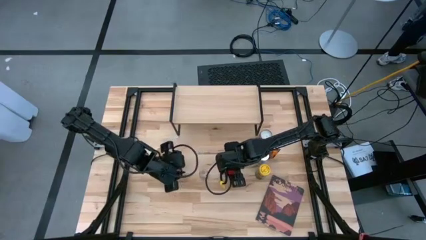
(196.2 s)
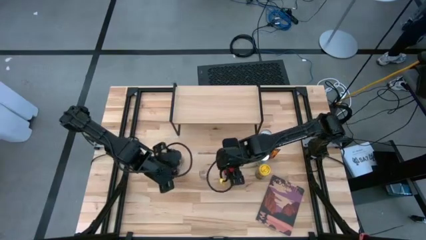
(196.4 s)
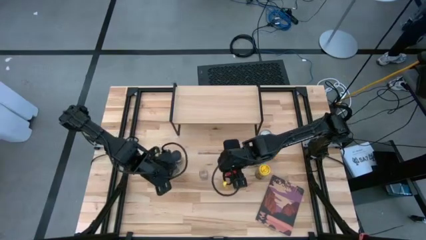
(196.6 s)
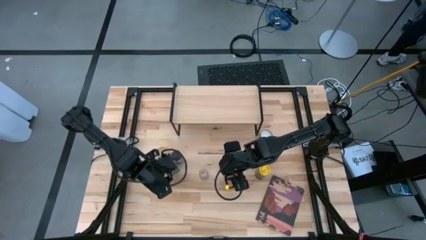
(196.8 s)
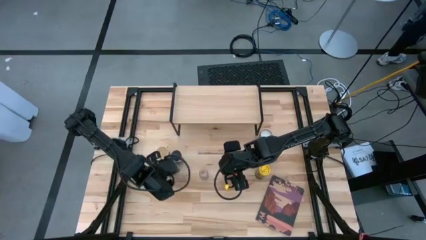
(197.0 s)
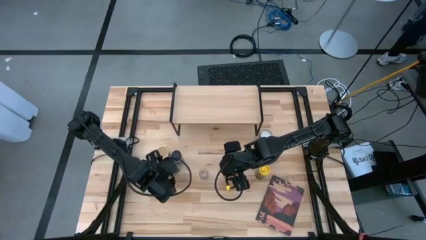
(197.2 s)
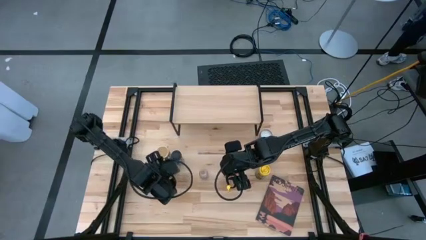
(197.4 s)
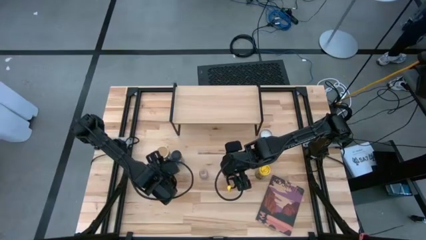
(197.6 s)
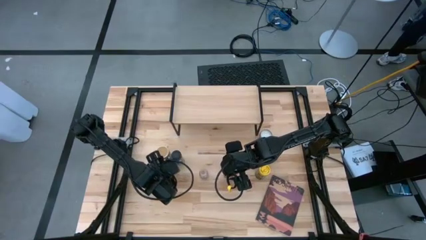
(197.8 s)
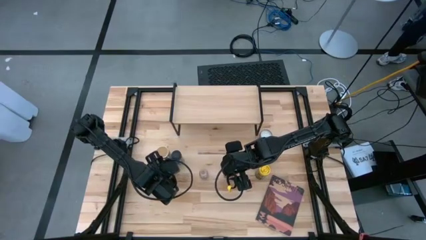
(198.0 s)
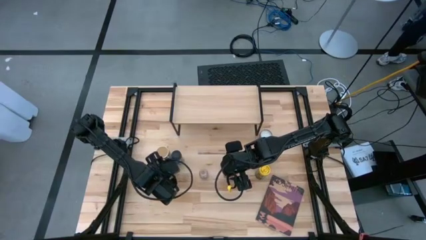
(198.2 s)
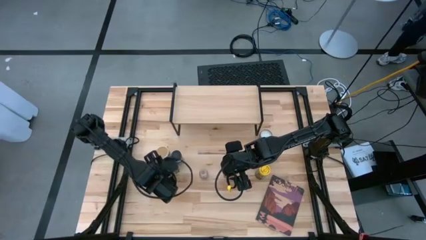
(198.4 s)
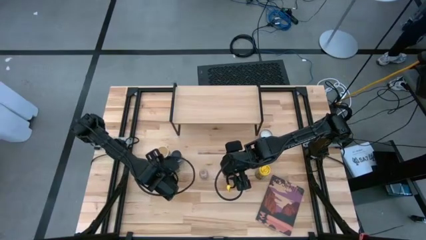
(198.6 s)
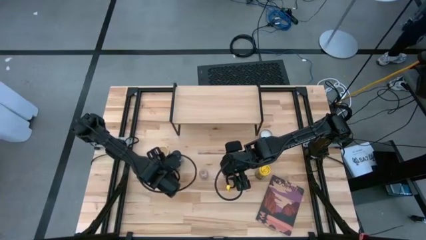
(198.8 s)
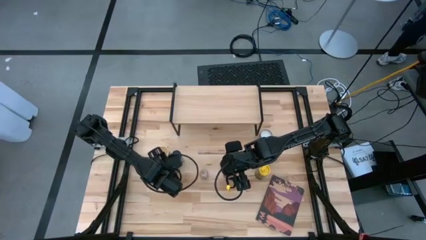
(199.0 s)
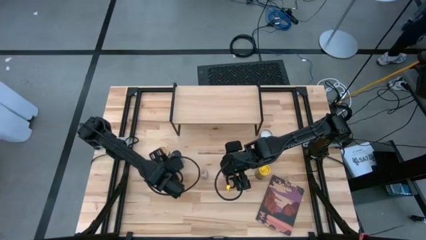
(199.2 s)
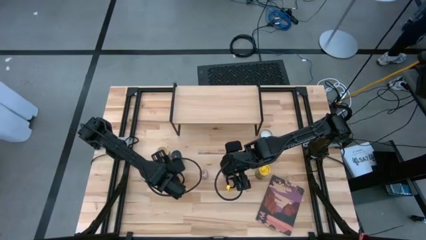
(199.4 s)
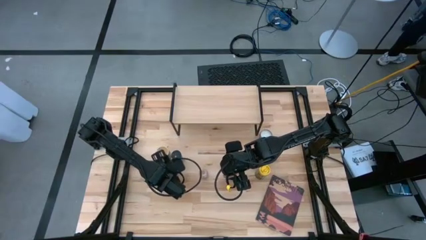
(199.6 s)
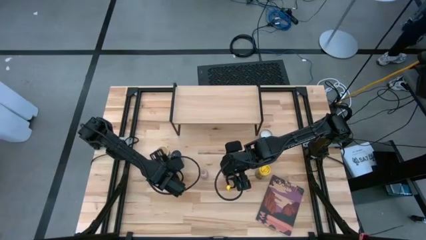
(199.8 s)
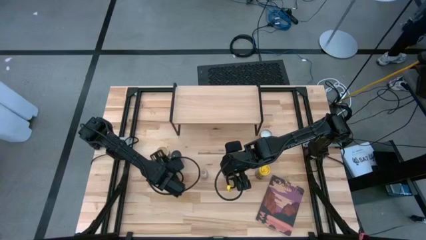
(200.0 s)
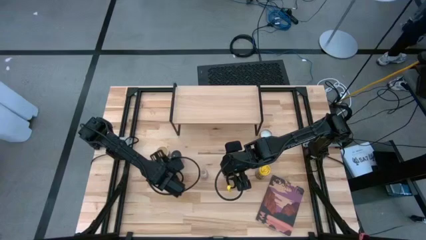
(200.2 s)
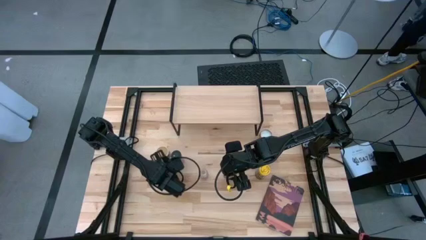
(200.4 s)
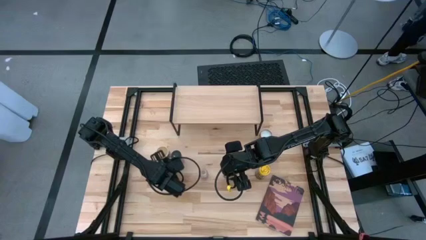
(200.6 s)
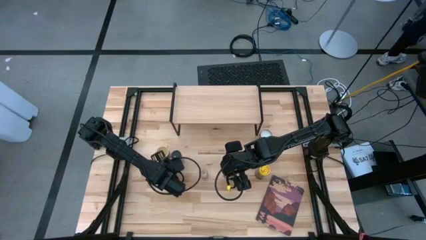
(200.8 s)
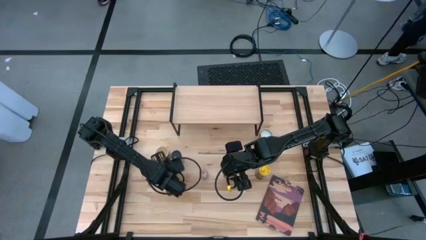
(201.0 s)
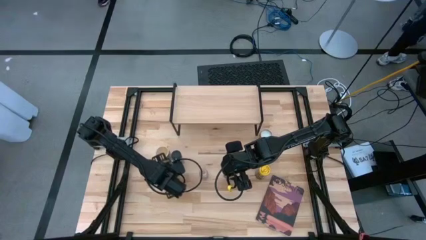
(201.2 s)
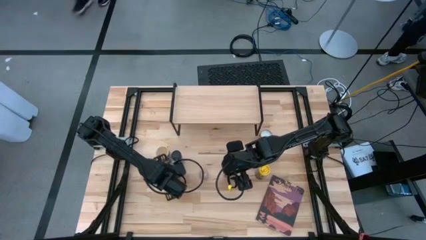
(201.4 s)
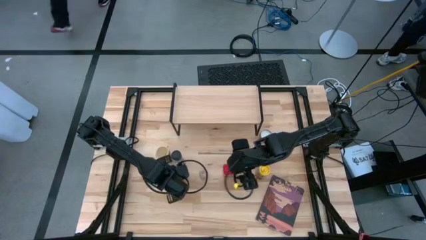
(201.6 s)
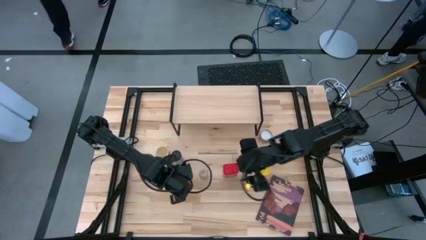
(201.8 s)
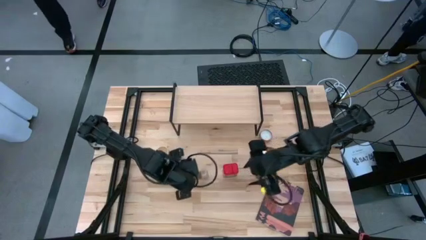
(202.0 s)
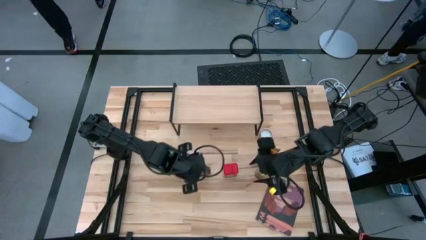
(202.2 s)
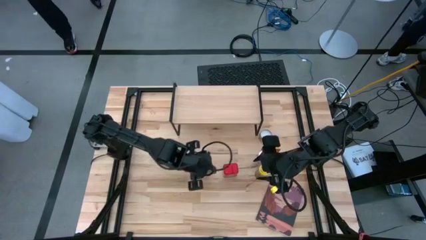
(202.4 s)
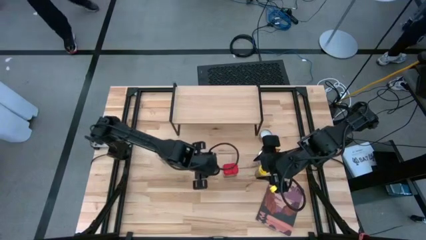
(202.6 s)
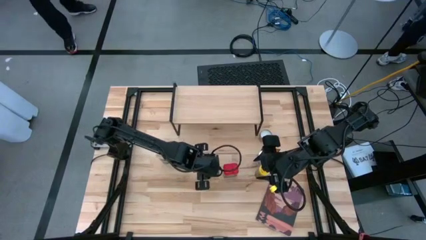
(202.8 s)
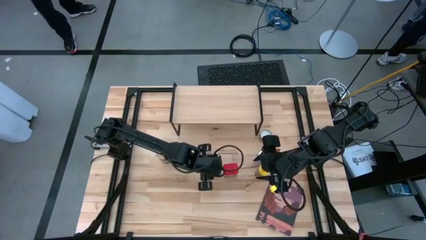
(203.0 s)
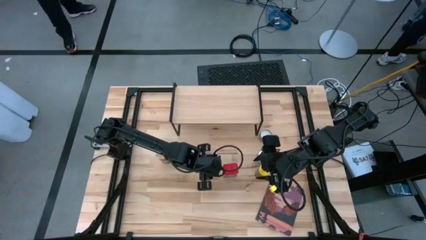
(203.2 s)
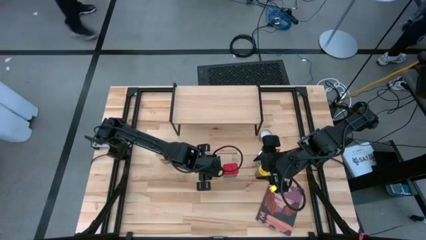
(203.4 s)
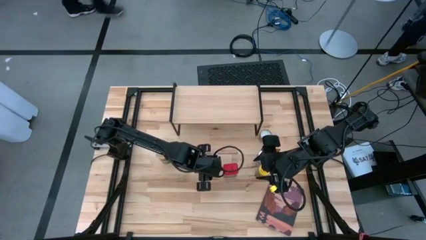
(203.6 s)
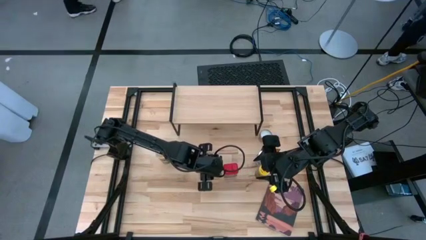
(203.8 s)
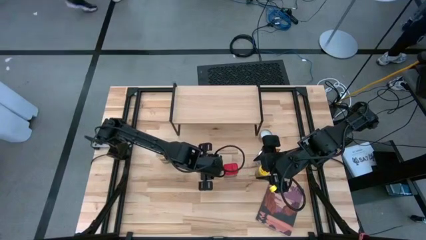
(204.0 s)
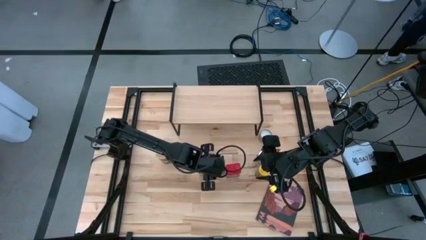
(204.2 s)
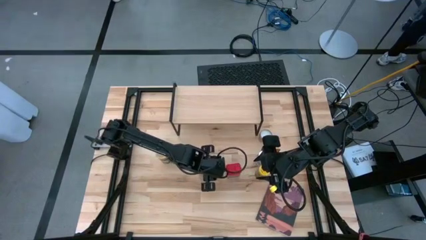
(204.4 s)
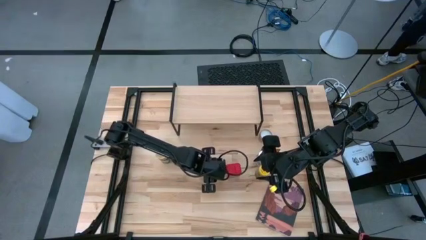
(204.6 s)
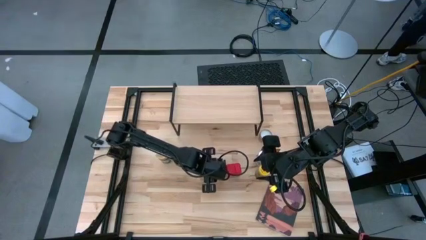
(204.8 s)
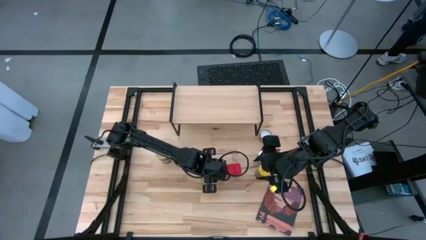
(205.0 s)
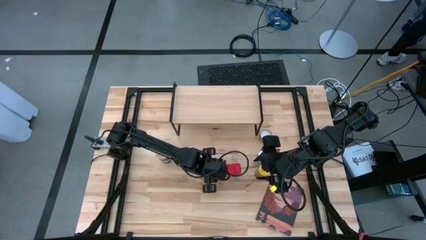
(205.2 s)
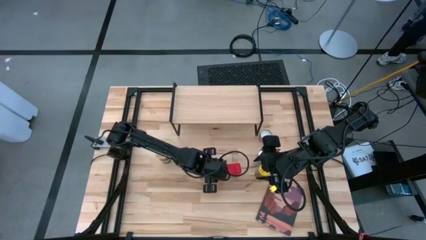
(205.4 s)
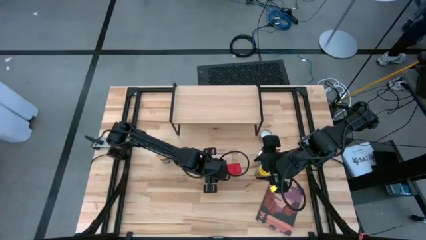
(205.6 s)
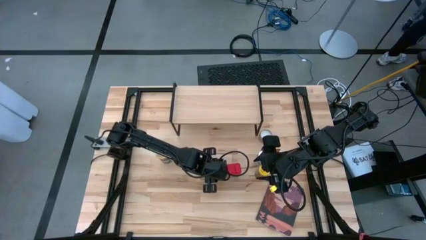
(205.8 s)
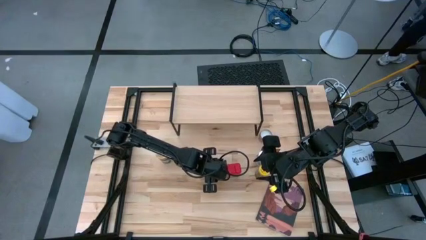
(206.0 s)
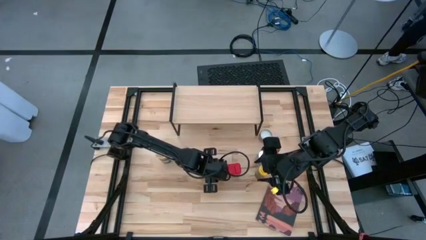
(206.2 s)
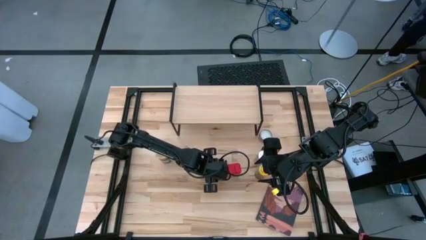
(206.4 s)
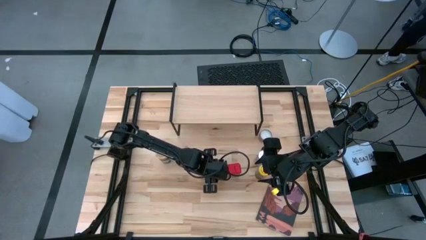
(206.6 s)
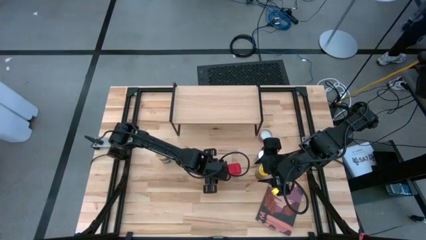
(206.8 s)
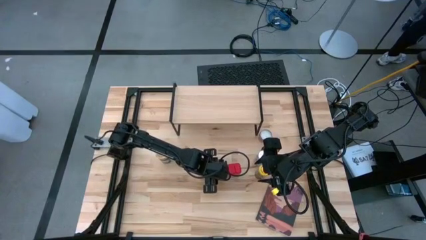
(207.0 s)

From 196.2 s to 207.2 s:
Task: Shelf spices
Put the green packet of spices into the center of the table

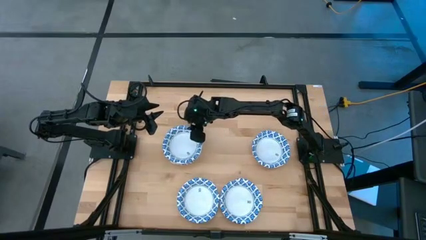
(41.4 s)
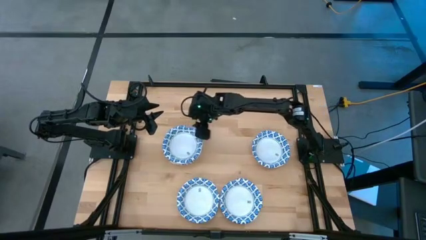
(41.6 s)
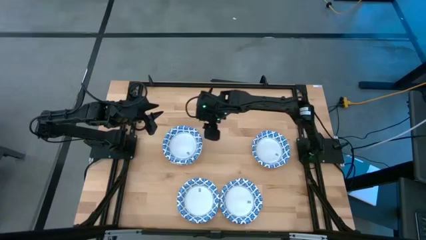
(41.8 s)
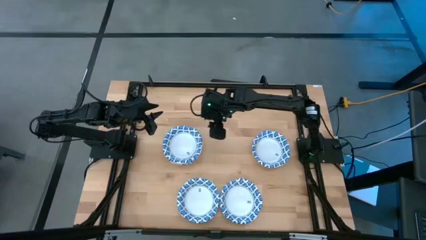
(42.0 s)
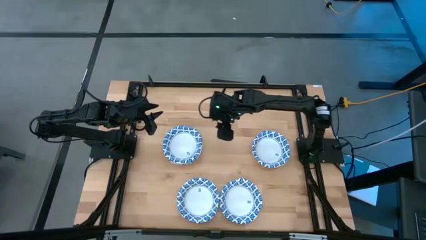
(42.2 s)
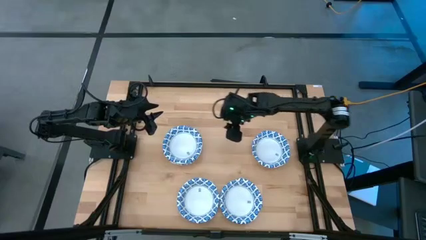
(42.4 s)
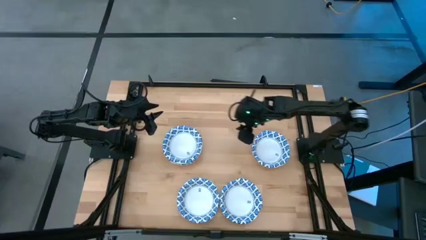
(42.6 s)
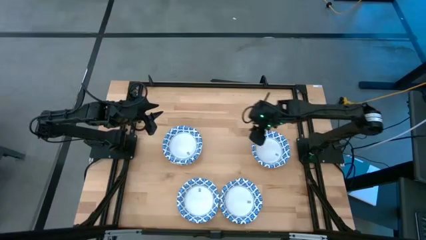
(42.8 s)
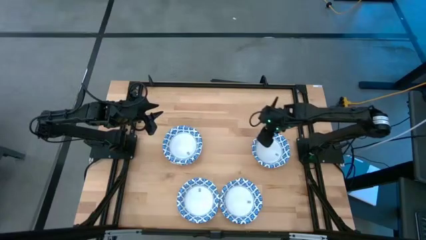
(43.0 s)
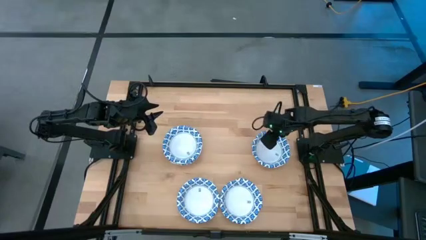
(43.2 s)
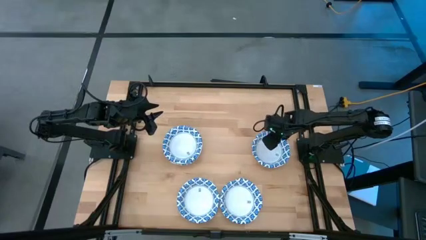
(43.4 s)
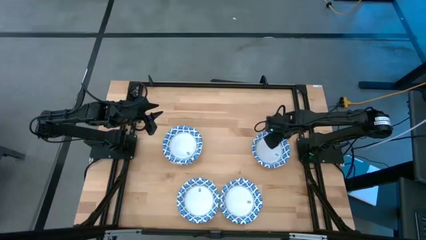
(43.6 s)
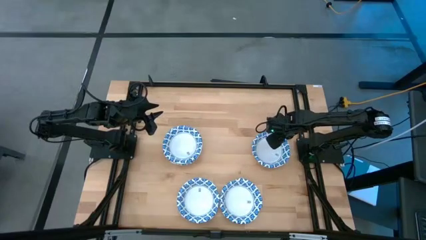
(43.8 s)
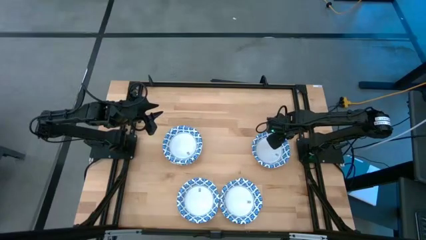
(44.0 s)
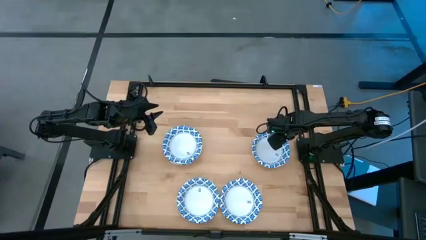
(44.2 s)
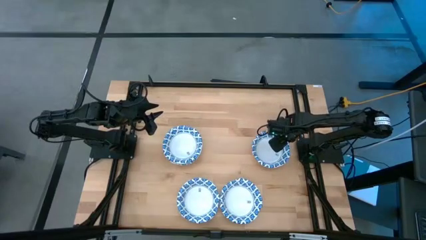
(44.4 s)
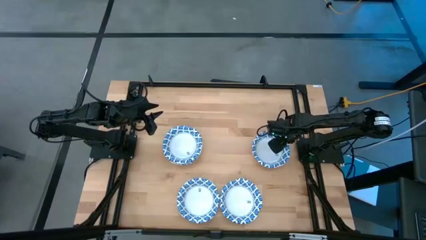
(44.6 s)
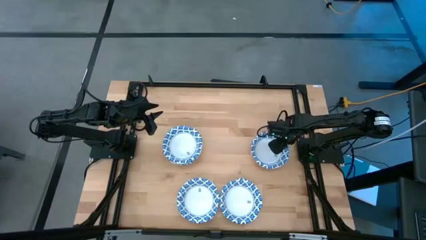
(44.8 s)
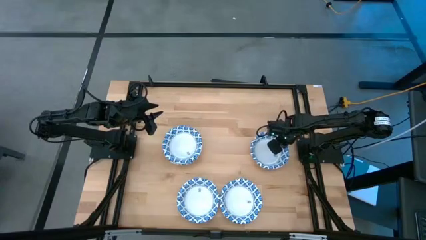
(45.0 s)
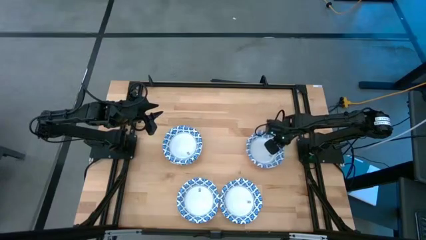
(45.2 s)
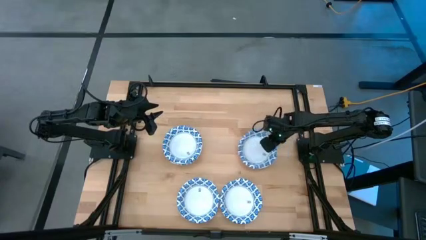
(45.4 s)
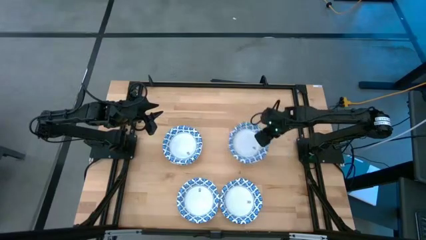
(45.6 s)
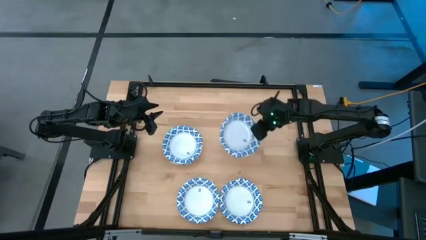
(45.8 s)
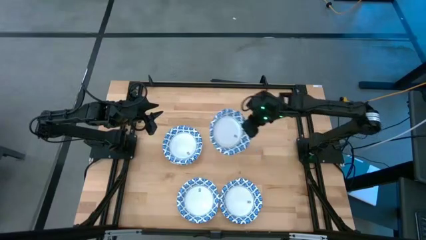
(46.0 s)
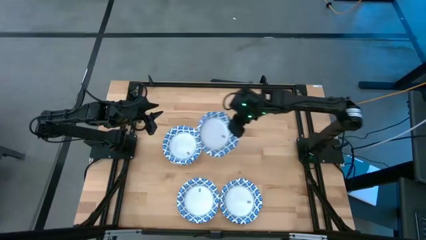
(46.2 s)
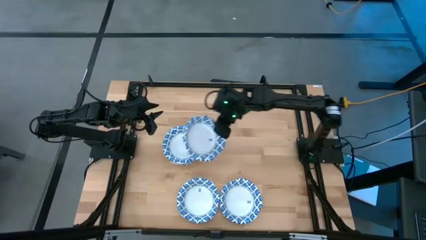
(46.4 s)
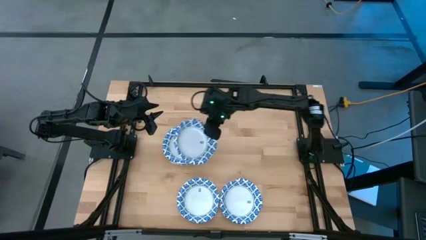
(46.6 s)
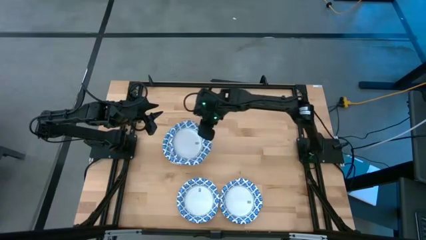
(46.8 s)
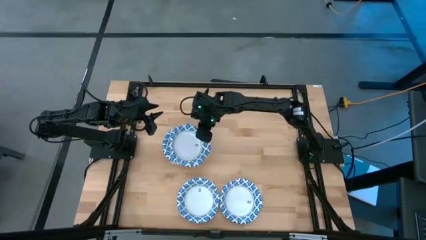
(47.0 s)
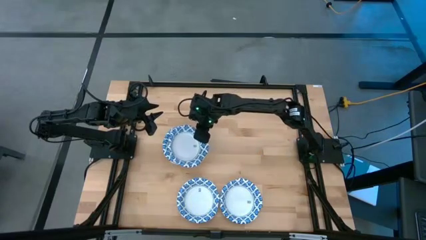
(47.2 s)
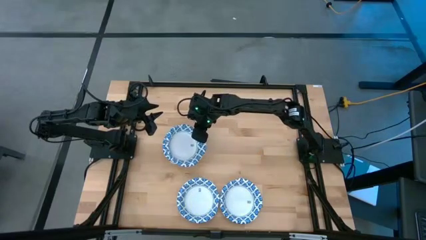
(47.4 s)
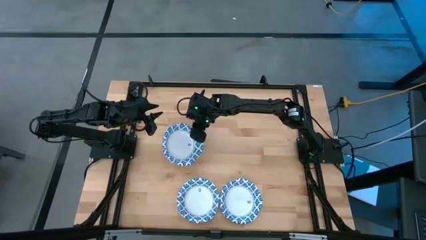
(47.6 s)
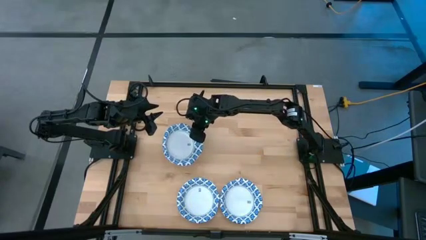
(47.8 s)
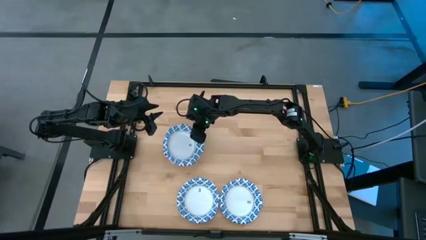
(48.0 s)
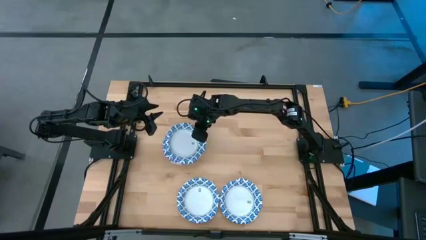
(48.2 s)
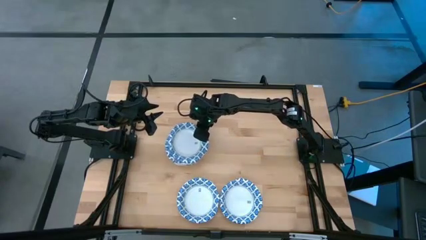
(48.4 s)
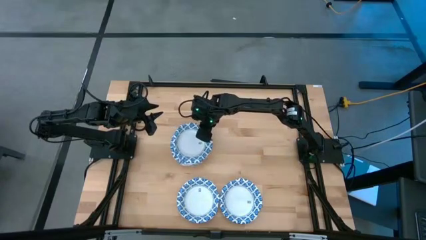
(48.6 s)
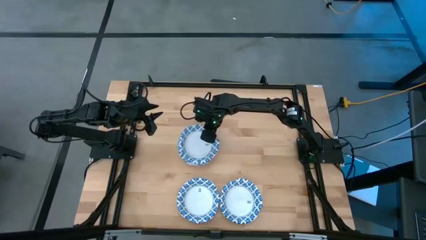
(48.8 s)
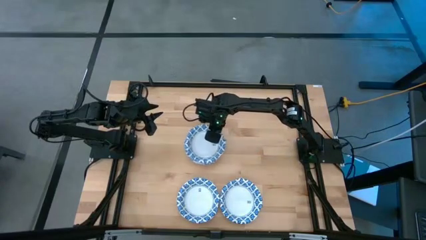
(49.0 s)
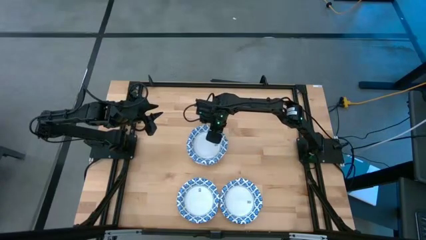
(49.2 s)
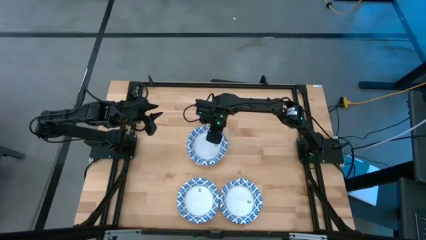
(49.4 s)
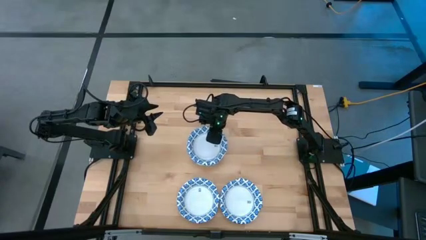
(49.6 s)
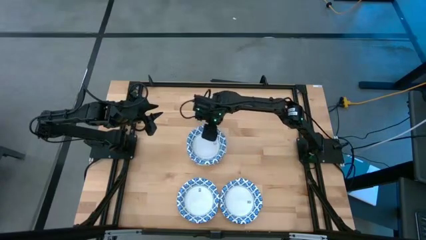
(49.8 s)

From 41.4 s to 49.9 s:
Task: Nest bowls inside each other
Stack the white bowl on the white bowl
